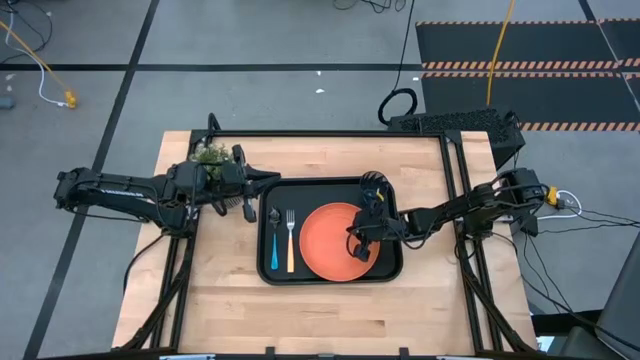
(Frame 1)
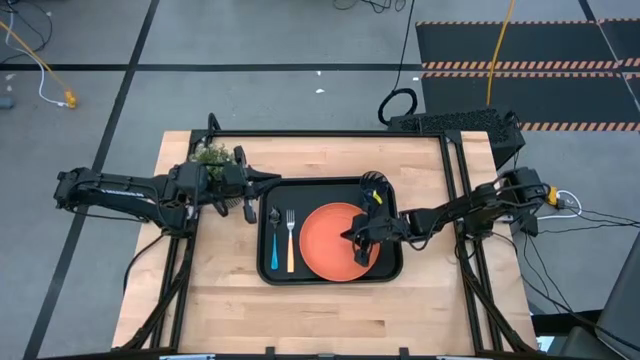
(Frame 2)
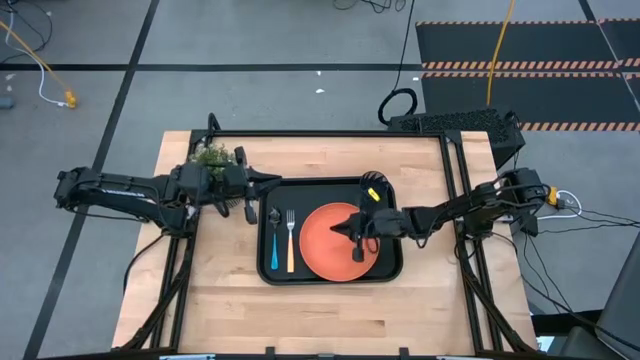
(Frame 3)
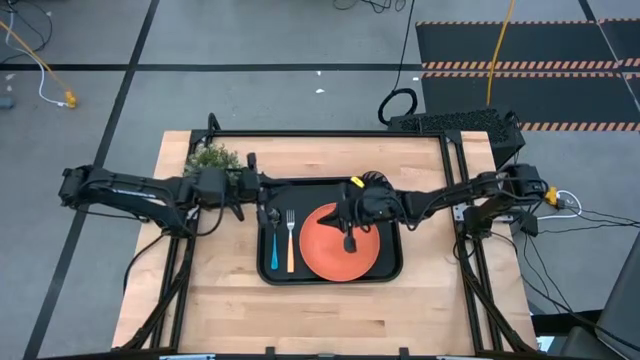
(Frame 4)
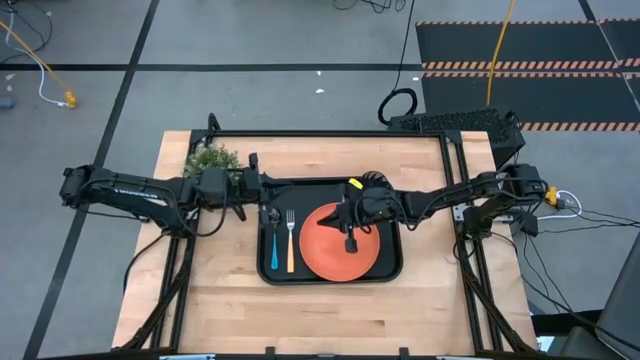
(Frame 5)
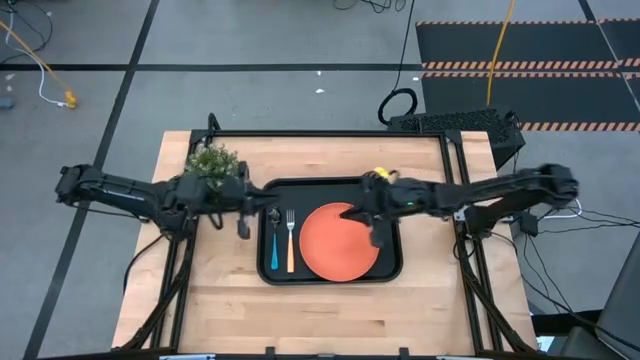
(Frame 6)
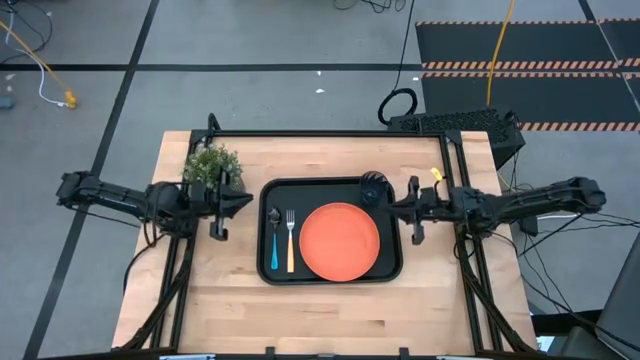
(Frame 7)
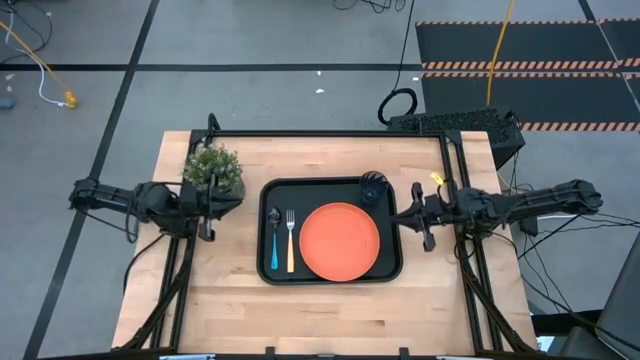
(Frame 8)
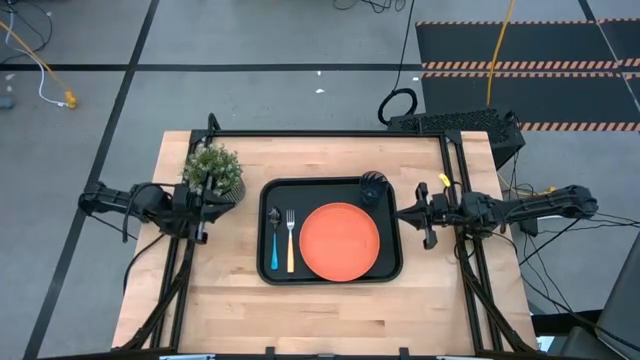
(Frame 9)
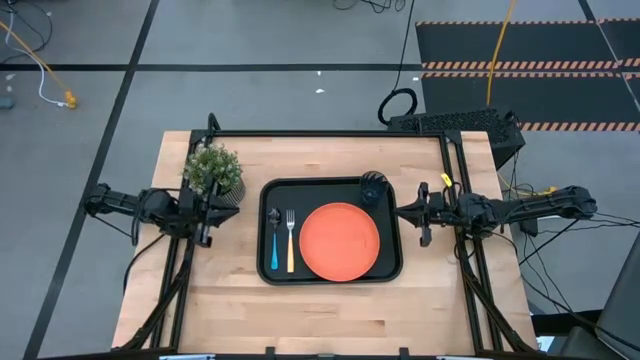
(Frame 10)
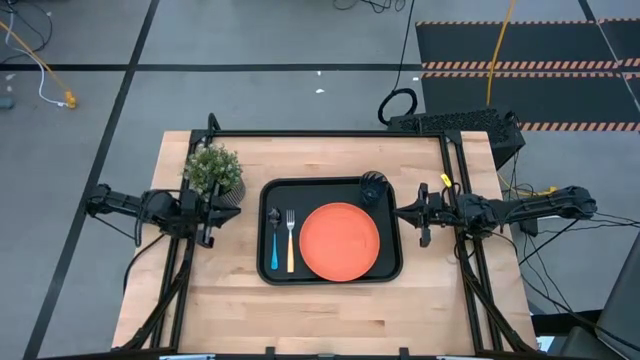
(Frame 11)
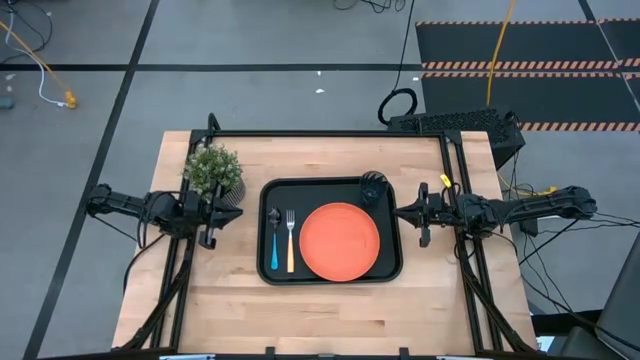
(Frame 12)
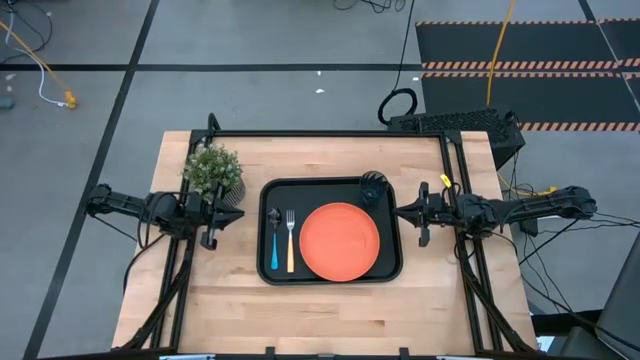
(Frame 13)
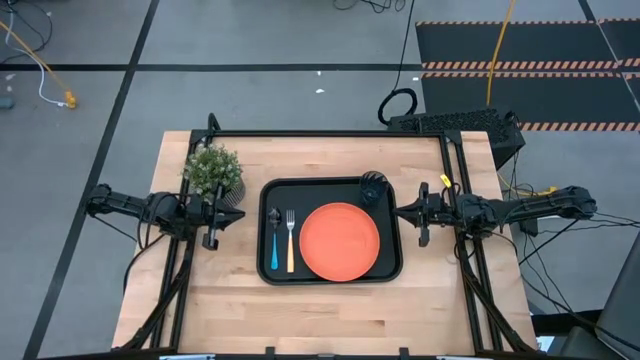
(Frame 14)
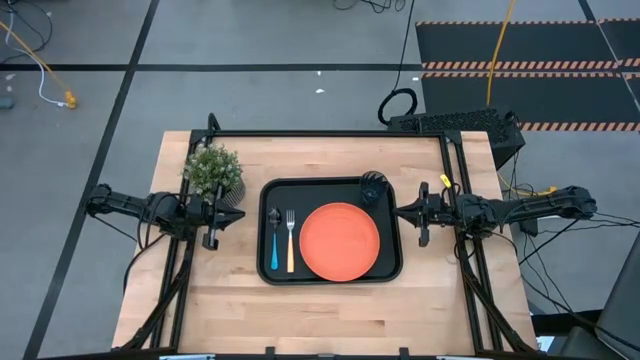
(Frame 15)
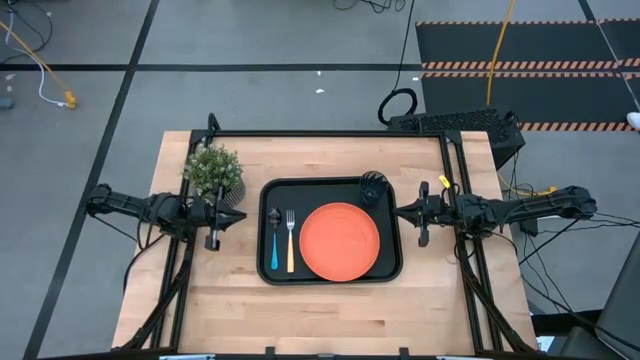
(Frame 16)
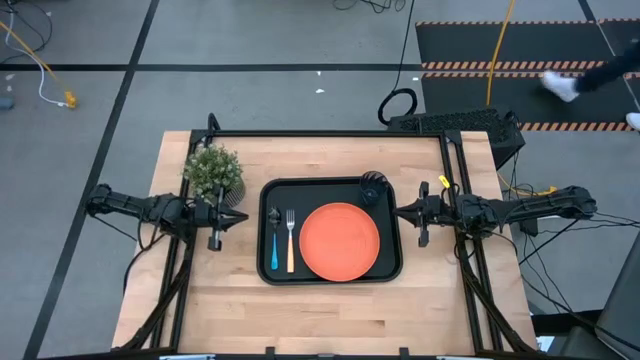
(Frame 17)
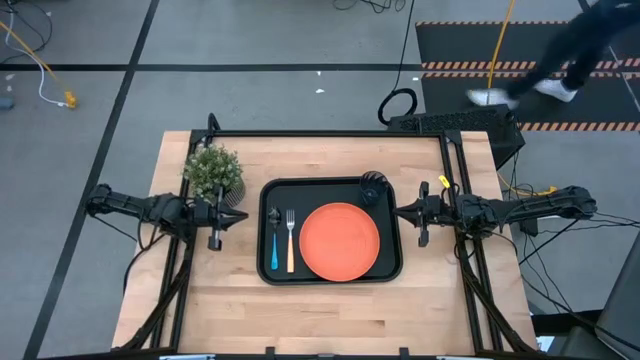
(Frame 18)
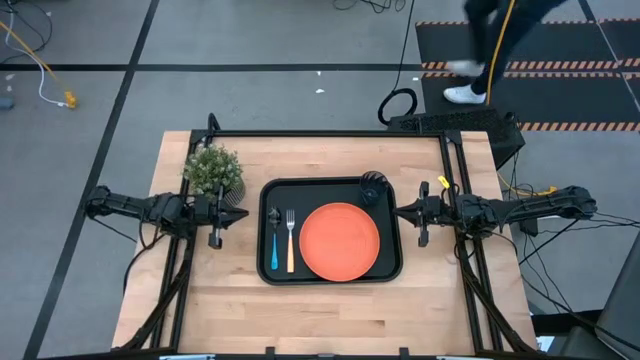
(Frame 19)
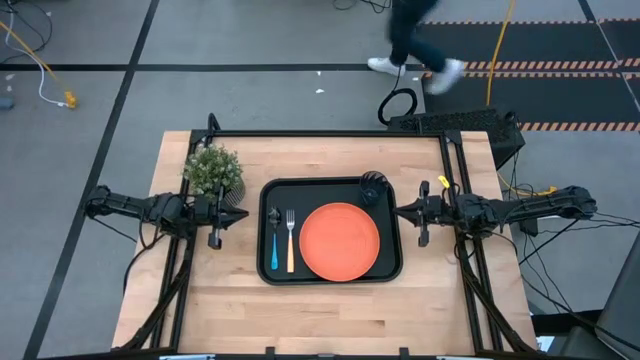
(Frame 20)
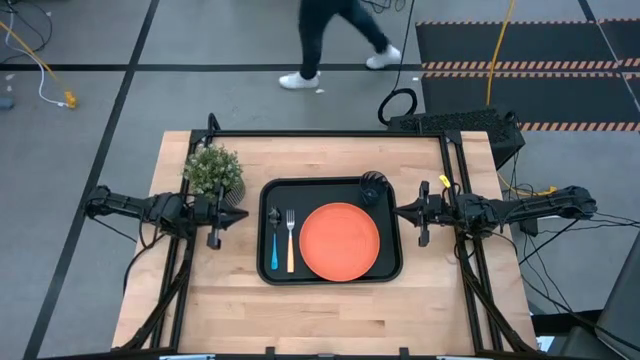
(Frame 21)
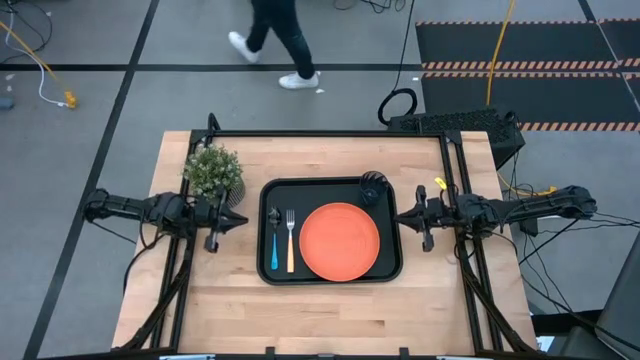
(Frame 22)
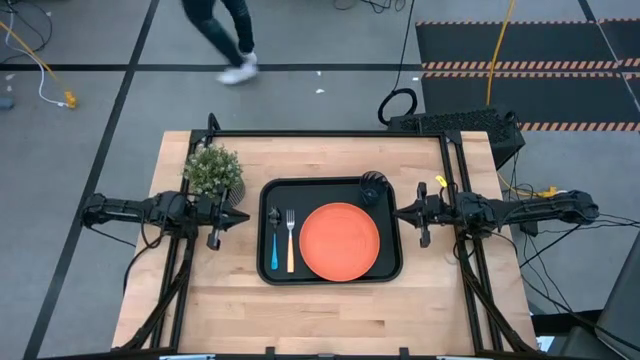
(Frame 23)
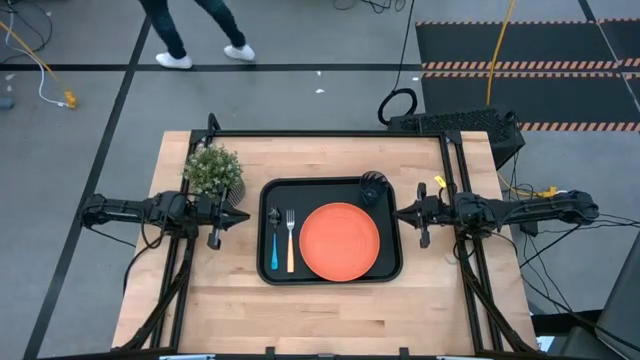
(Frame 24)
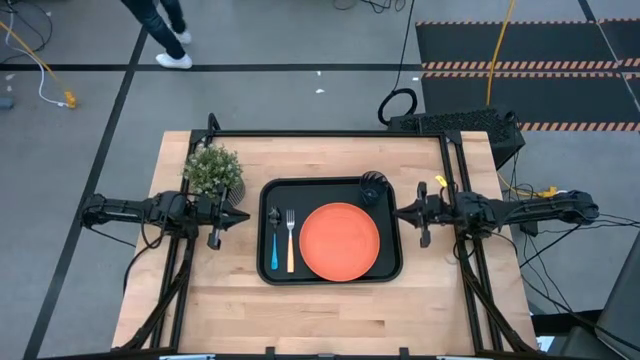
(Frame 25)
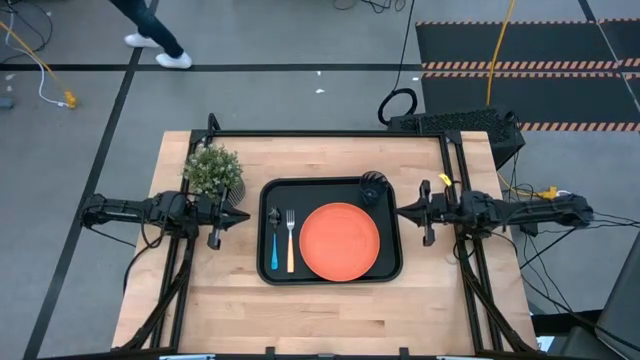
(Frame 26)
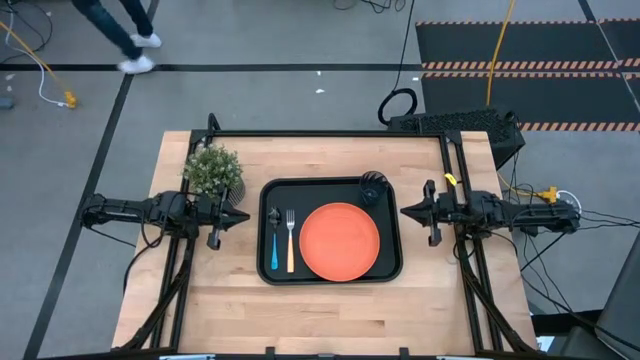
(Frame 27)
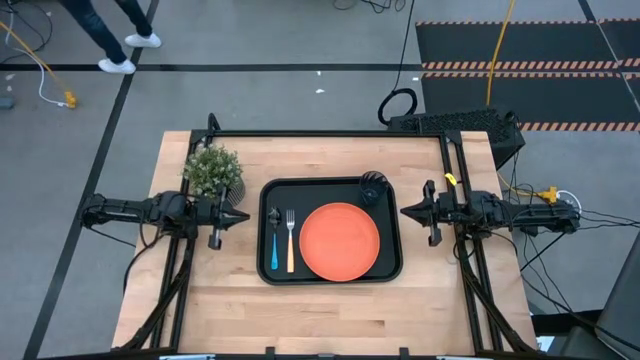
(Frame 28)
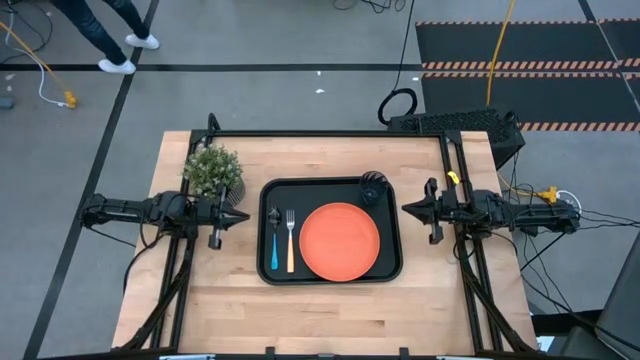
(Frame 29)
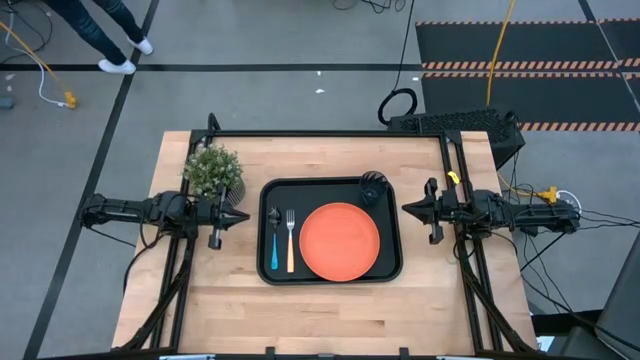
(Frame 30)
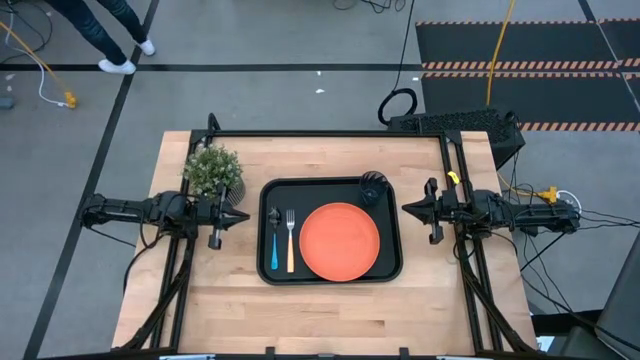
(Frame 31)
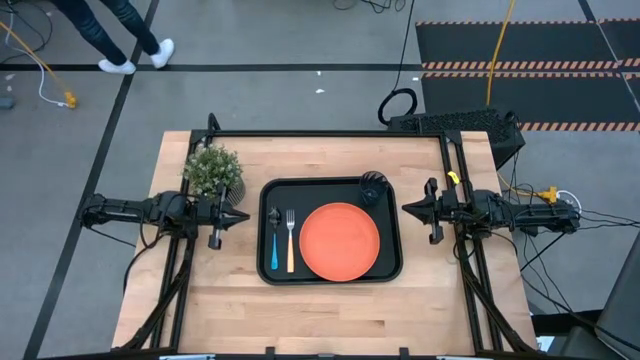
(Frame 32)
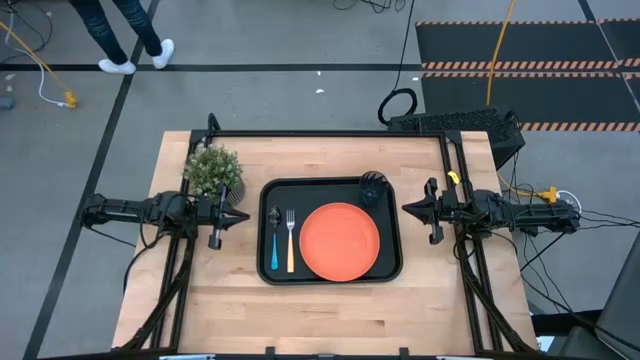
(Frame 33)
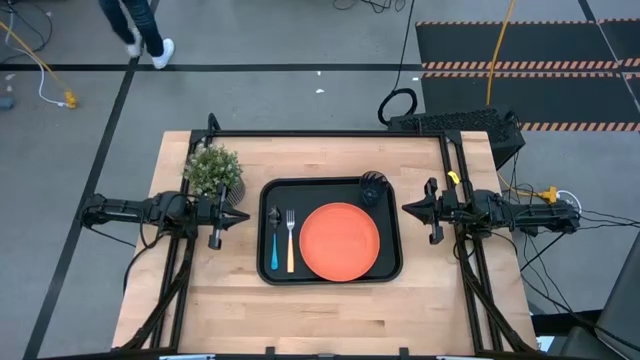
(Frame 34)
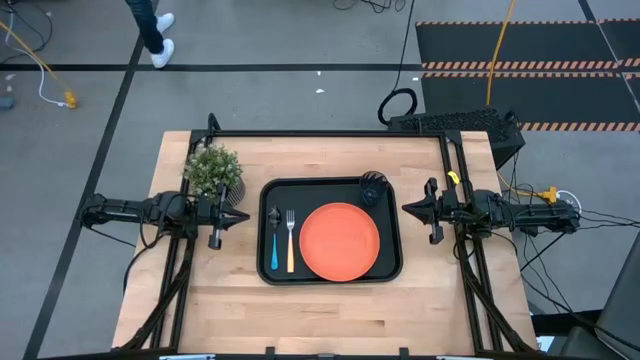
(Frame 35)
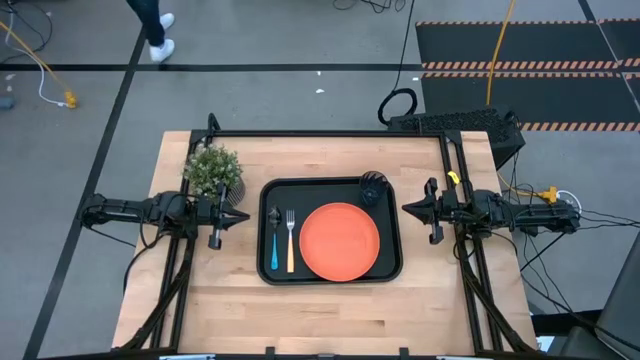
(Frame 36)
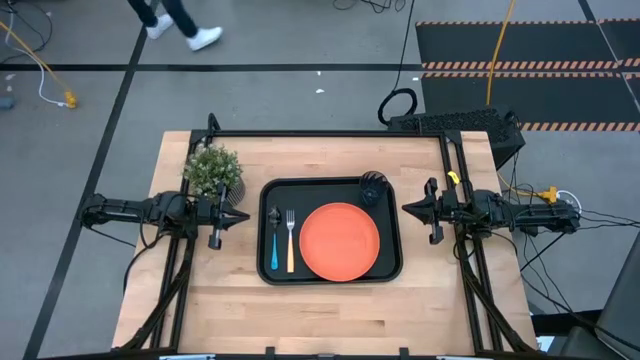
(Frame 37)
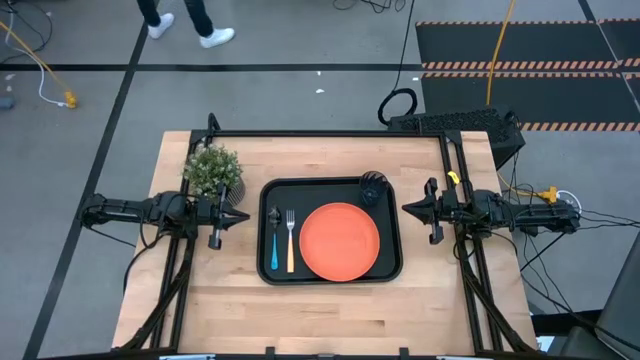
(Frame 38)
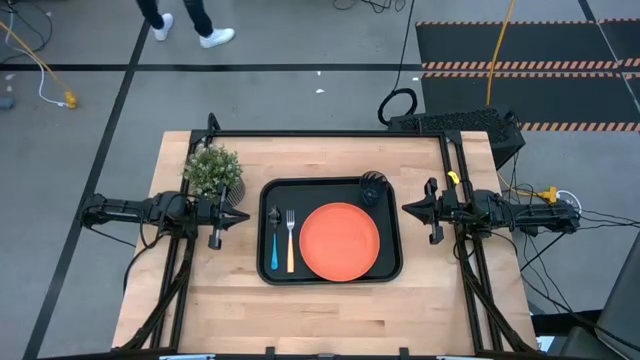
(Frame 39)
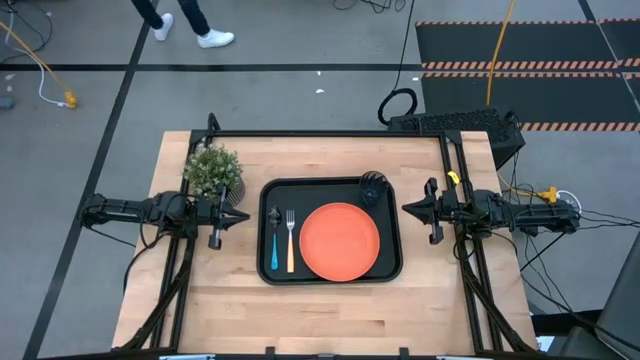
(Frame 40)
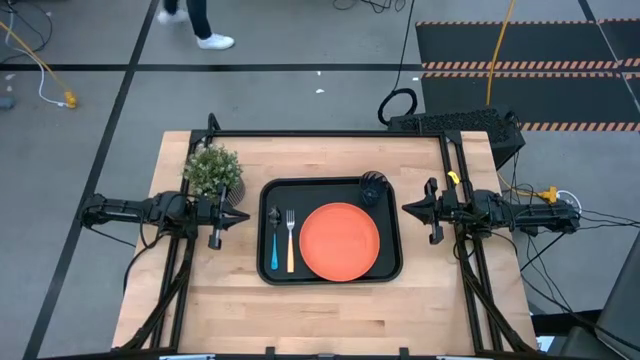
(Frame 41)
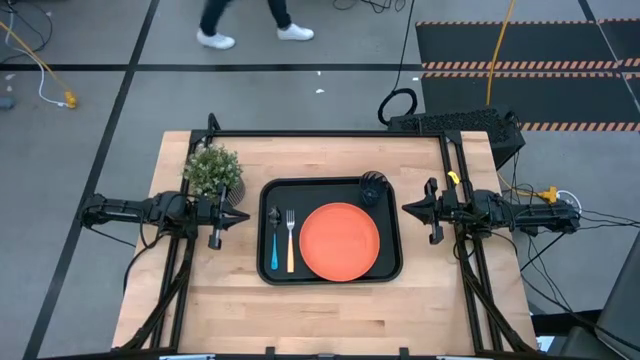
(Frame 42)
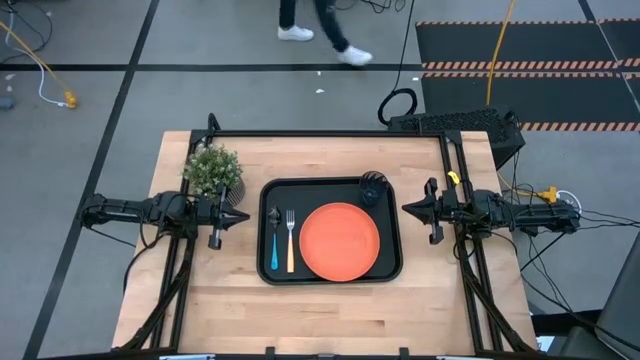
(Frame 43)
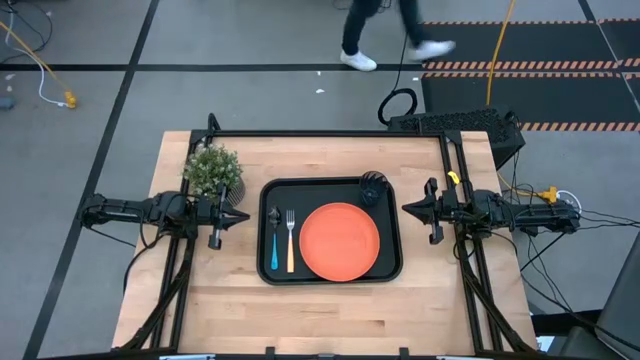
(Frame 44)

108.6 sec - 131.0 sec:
Task: Pick and place plate/cup/fork/spoon on tray
Return to Home Position
